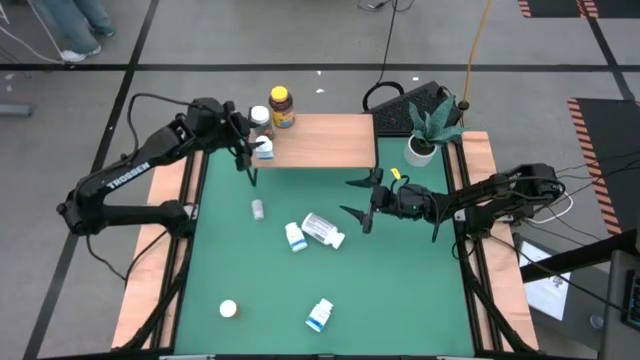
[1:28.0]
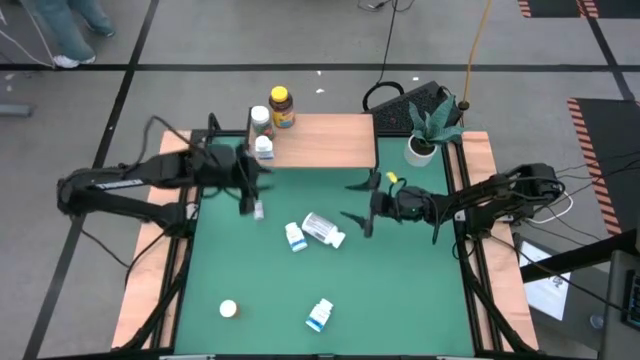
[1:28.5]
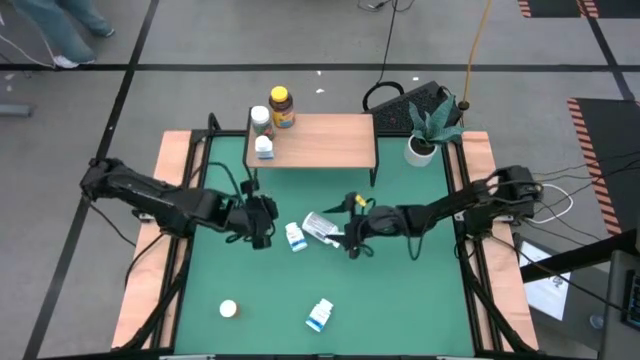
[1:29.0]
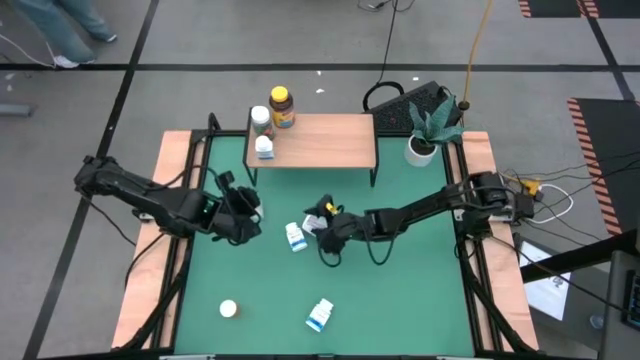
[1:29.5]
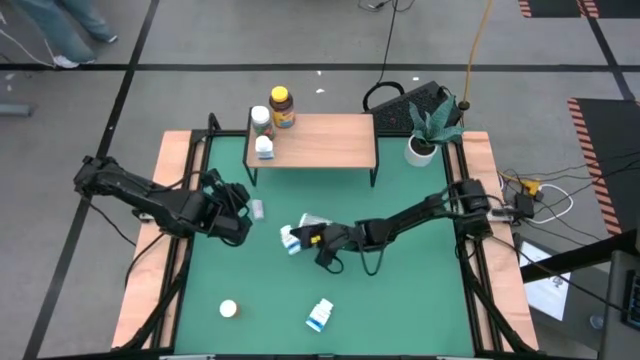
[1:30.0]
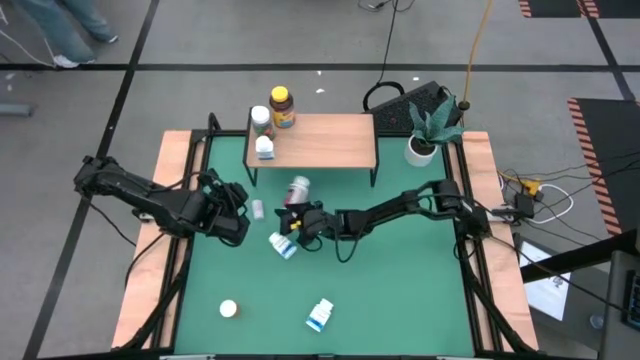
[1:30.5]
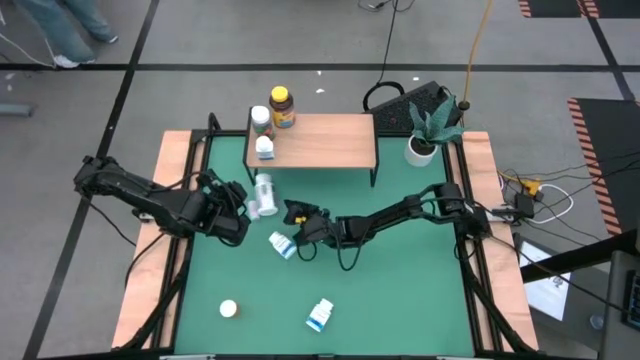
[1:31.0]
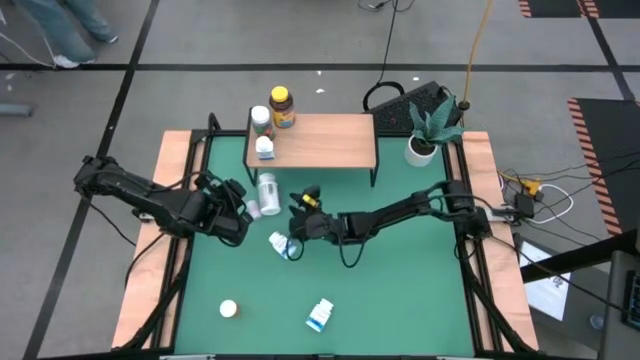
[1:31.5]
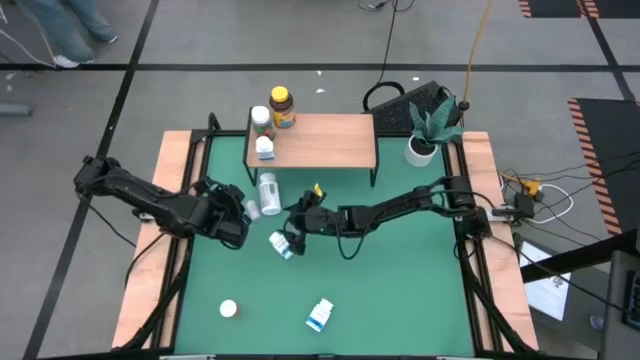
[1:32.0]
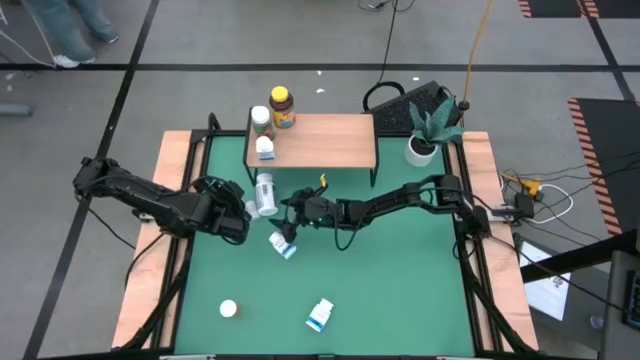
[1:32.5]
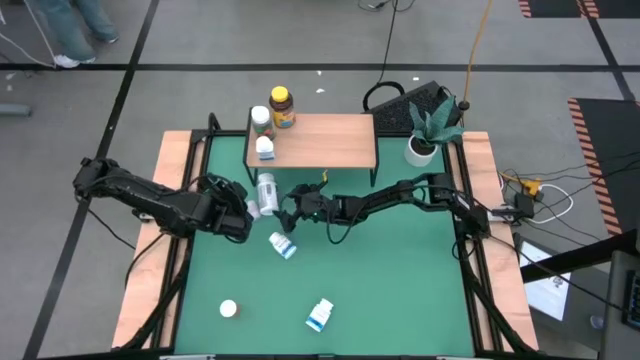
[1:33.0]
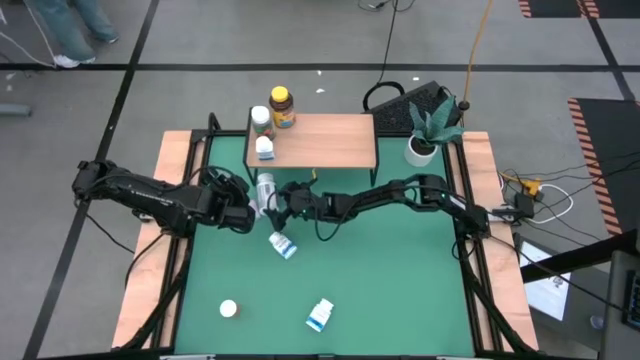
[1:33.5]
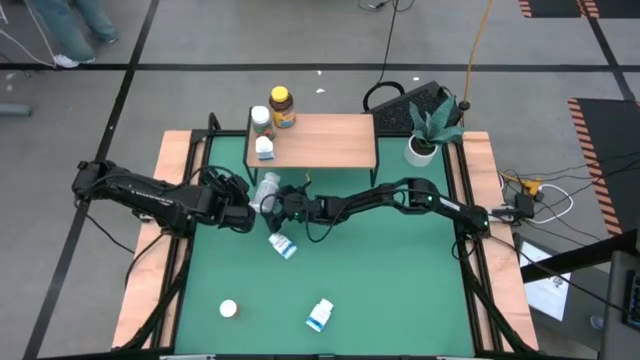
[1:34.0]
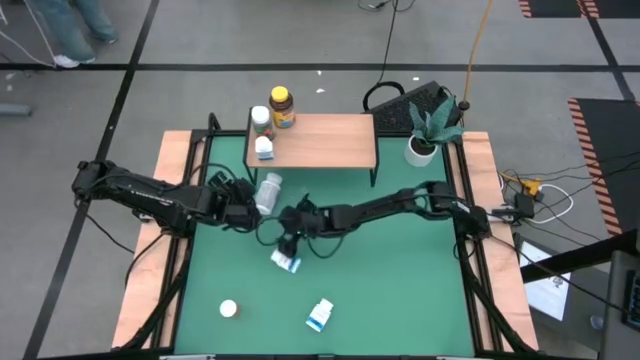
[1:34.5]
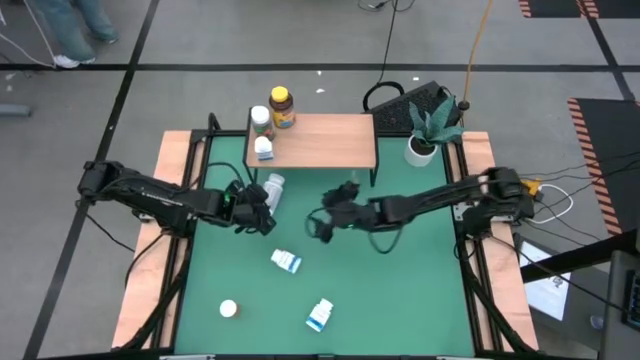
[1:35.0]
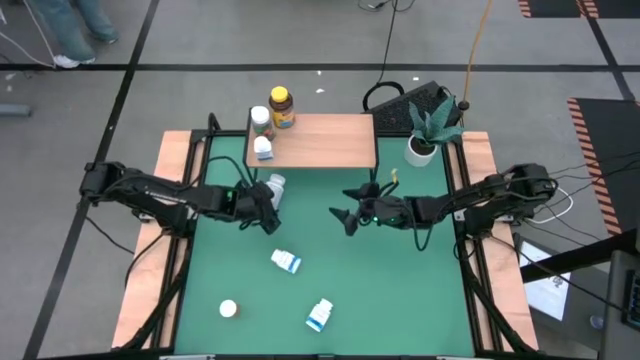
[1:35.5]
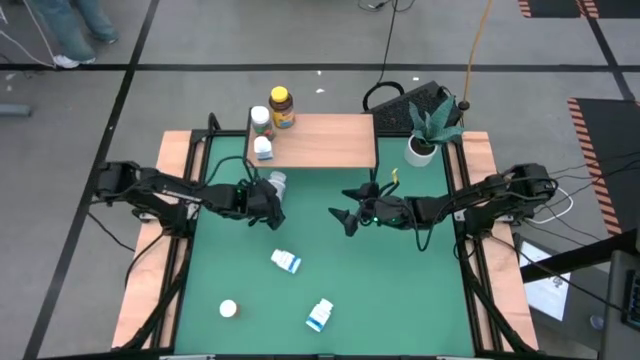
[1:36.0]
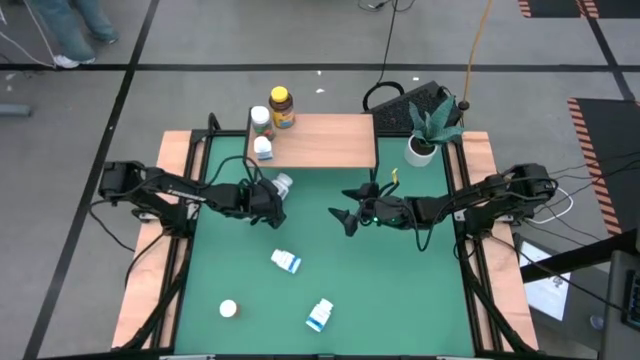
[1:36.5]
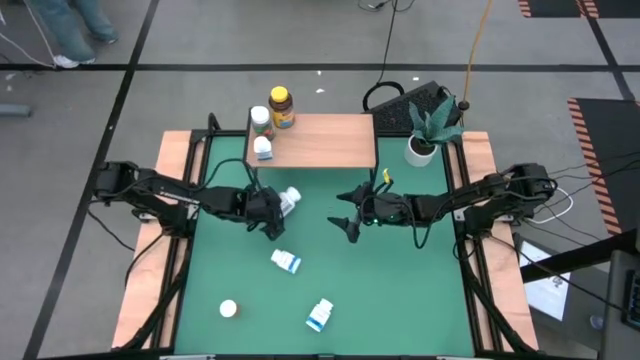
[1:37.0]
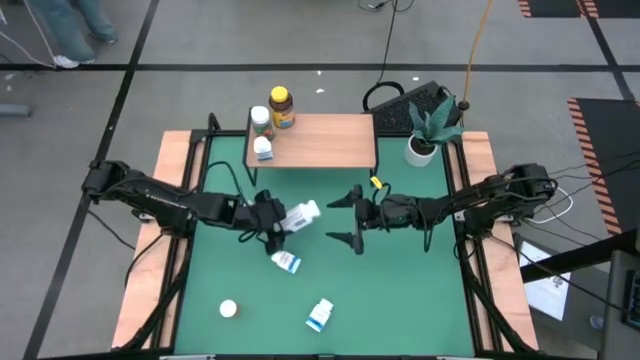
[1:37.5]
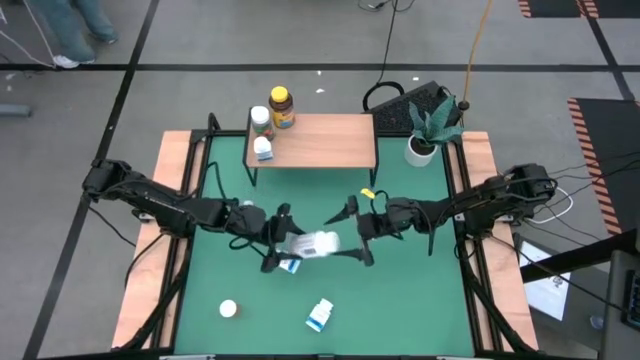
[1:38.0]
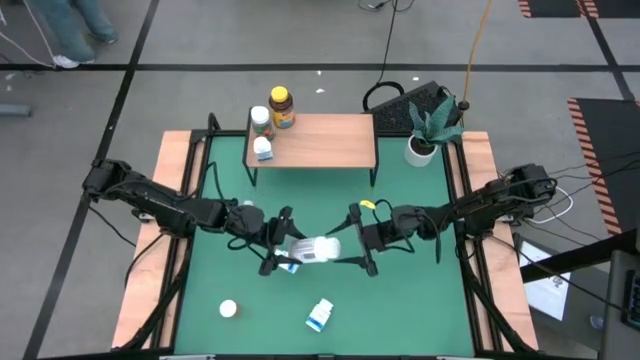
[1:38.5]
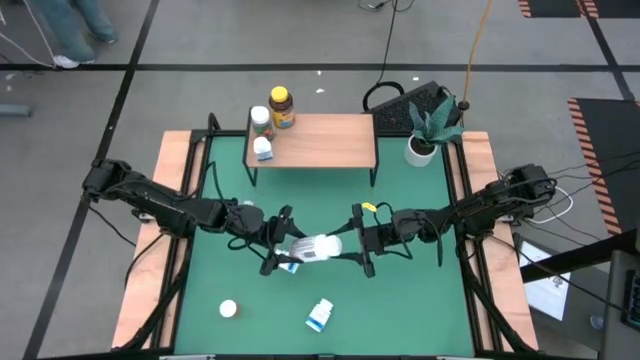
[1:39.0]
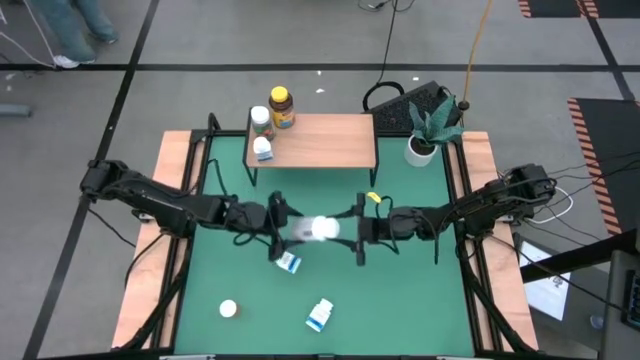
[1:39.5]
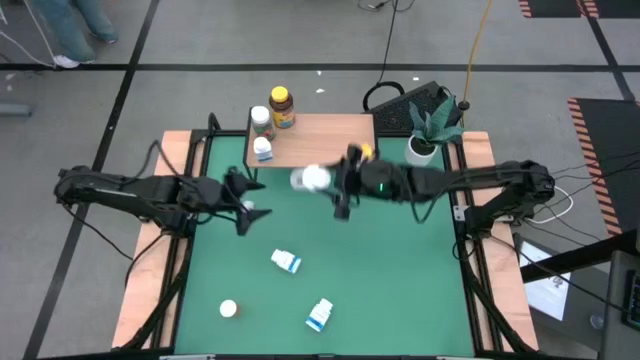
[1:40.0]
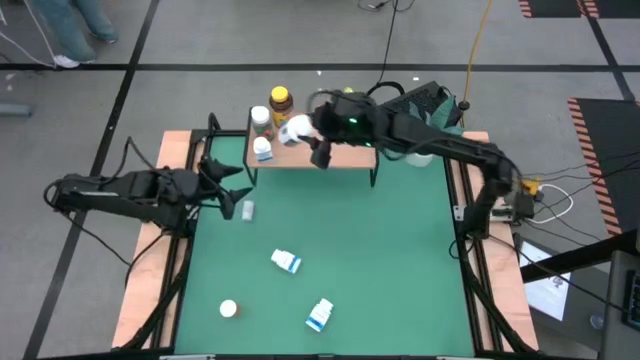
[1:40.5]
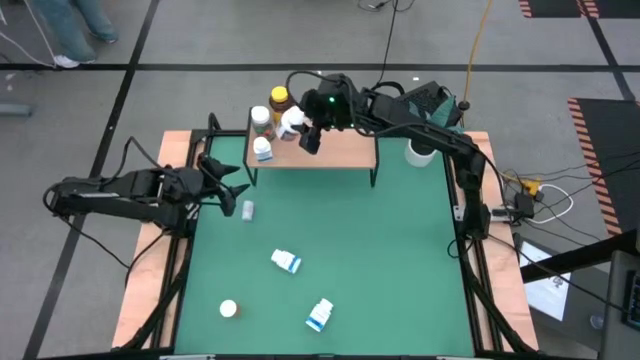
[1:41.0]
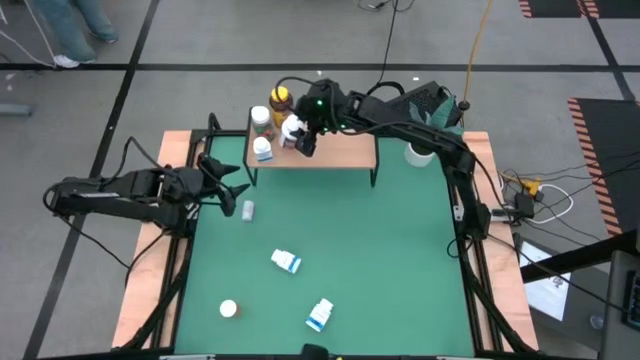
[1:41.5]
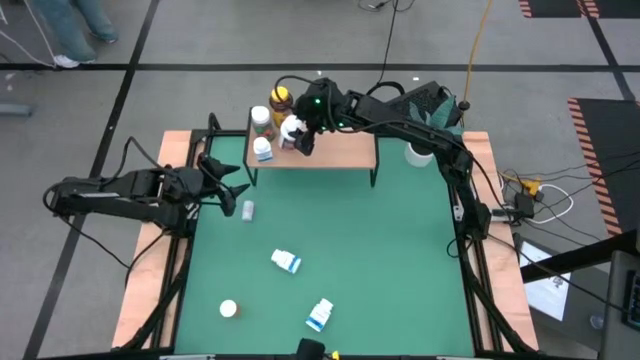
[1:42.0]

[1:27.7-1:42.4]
Task: Pick and place medicine bottles onto shelf by color
Put the white violet medicine bottle on the shelf

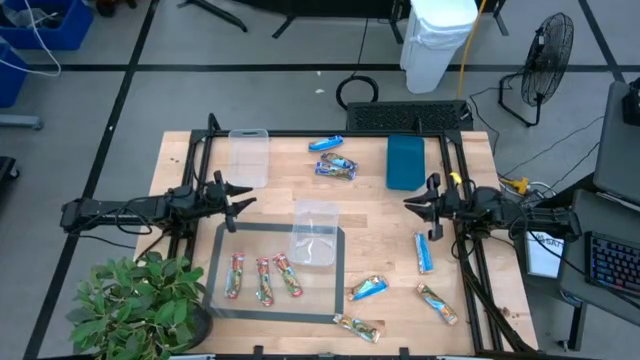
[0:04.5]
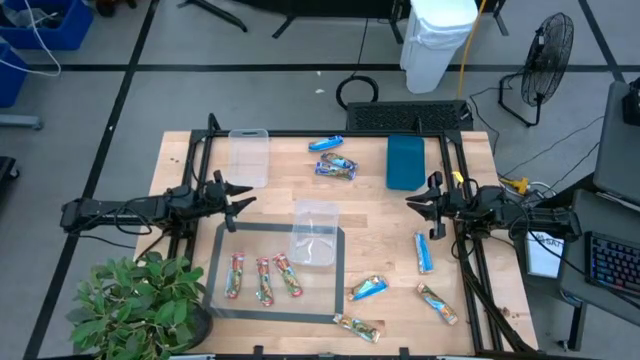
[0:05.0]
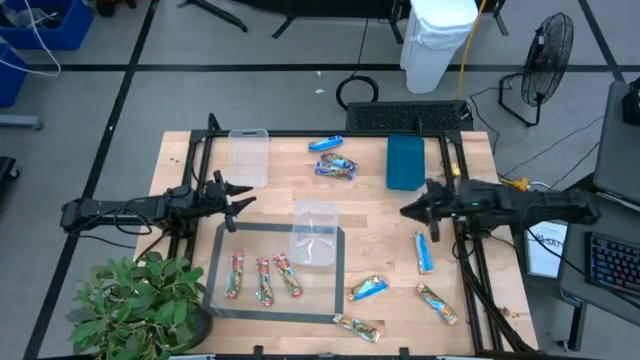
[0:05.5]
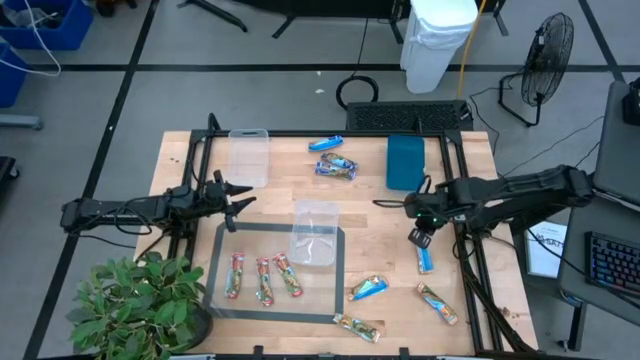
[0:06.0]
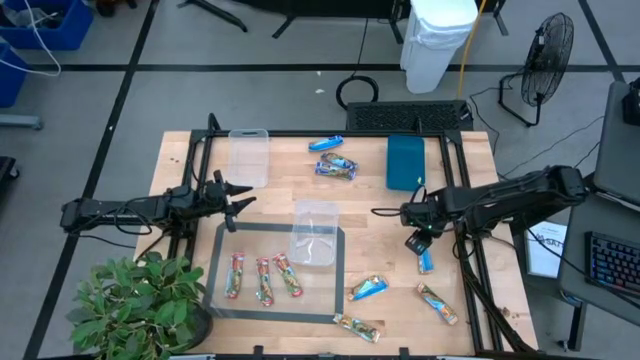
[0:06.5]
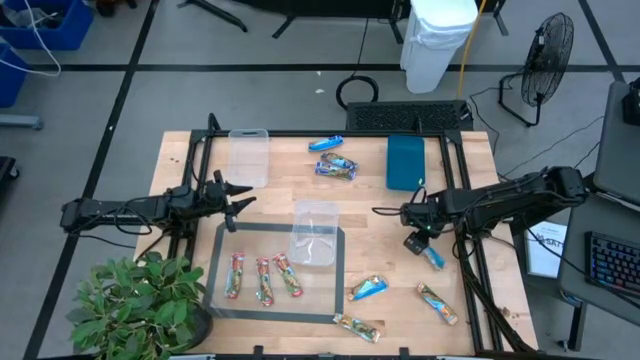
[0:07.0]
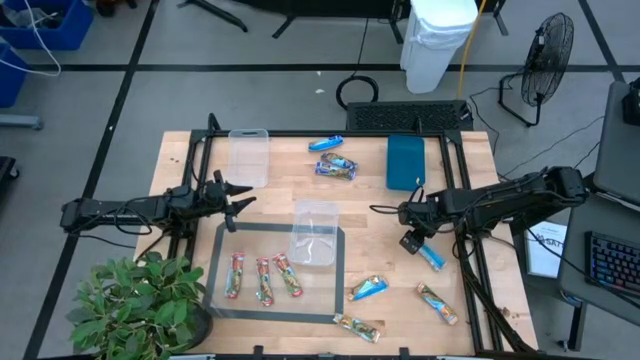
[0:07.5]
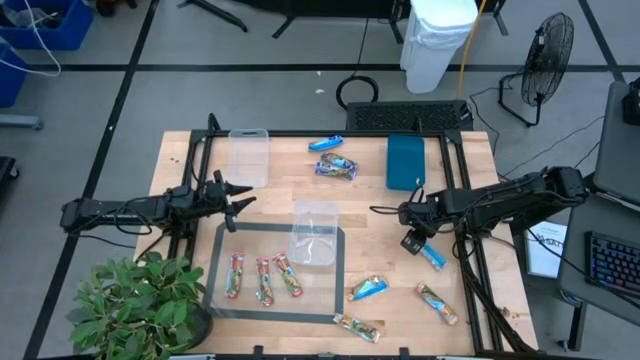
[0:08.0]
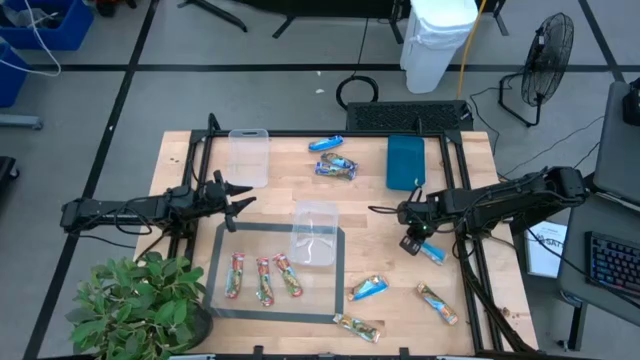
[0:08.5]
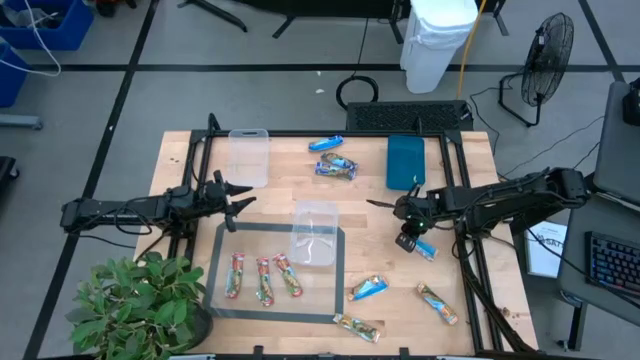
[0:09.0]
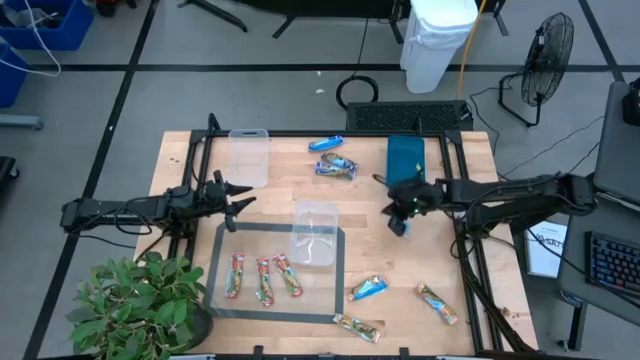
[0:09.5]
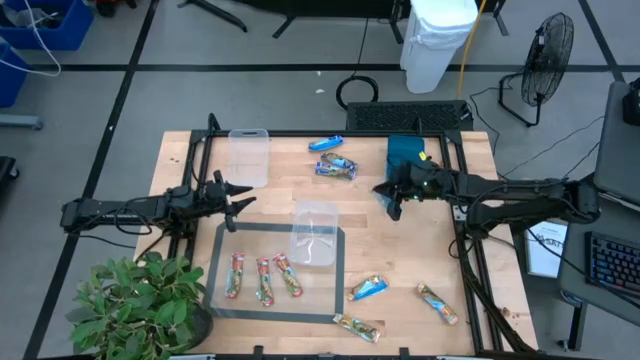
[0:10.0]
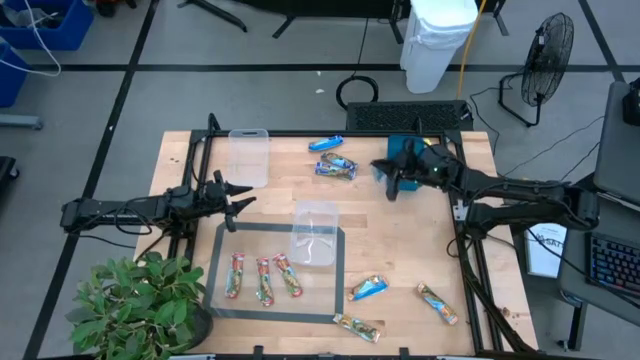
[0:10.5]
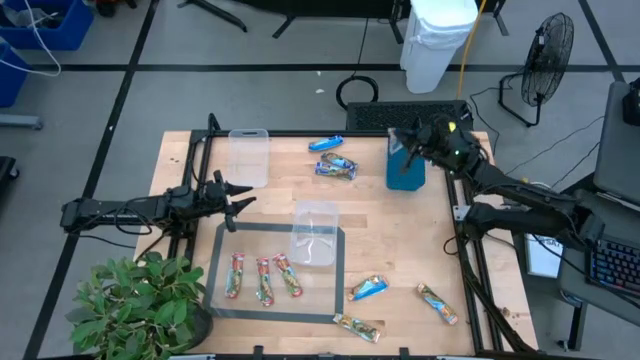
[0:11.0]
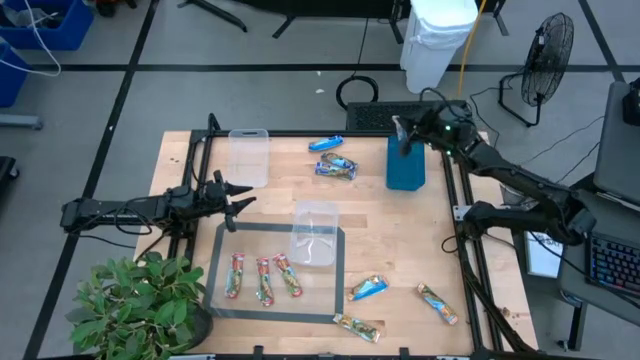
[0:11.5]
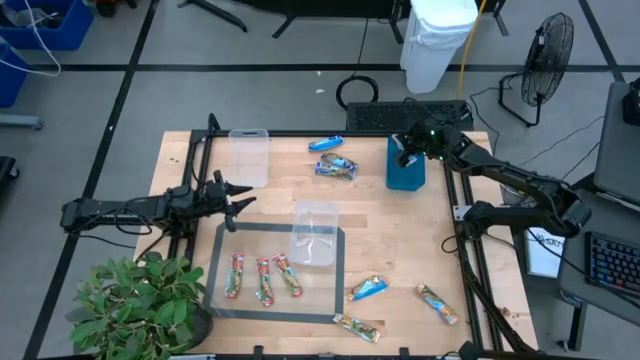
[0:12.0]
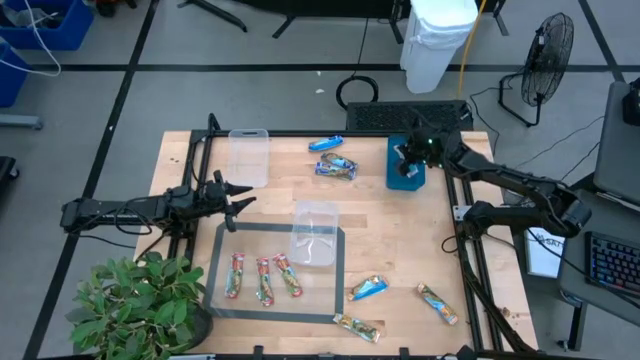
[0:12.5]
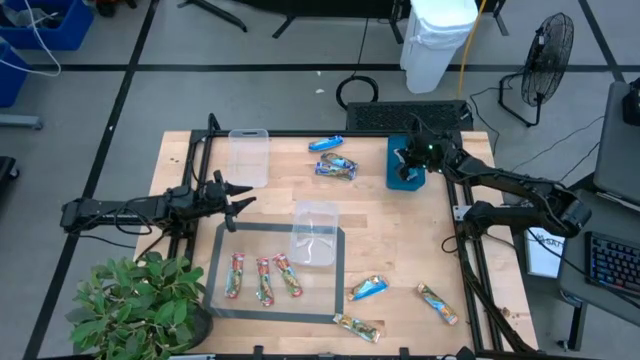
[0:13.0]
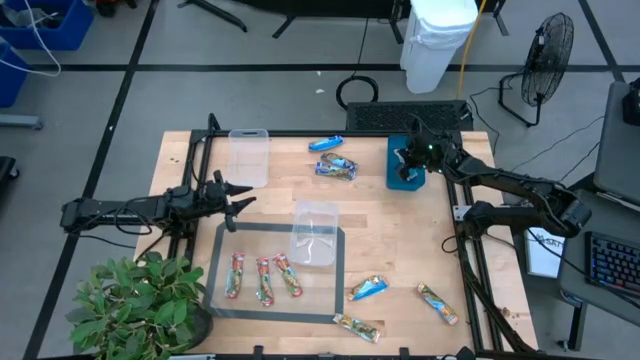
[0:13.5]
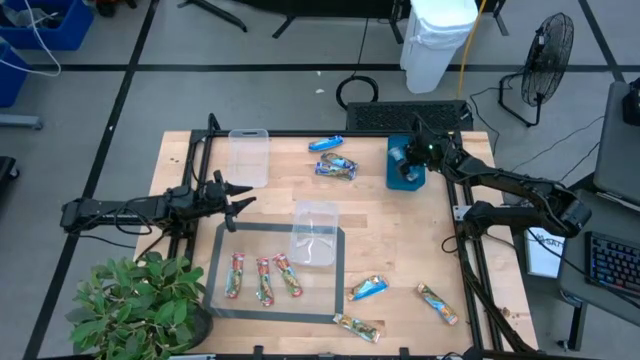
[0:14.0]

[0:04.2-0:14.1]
Task: Pick and place Granola Bars by type
Put the yellow granola bar into the blue bin
